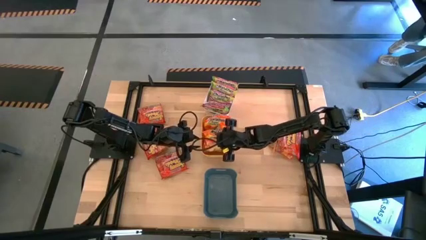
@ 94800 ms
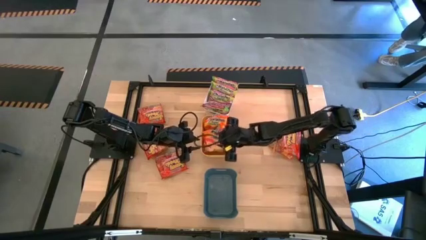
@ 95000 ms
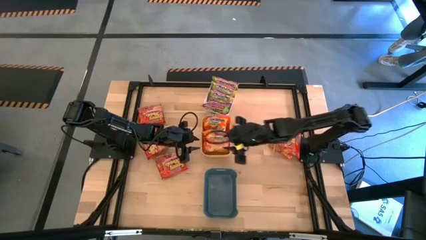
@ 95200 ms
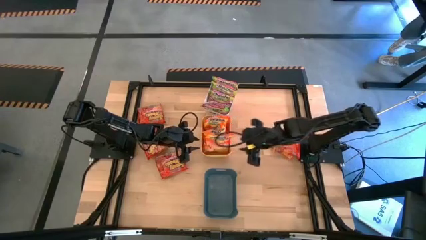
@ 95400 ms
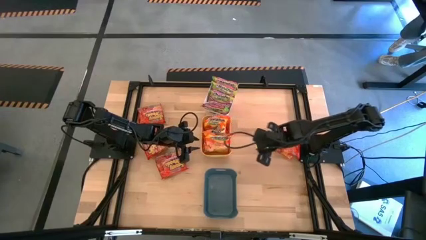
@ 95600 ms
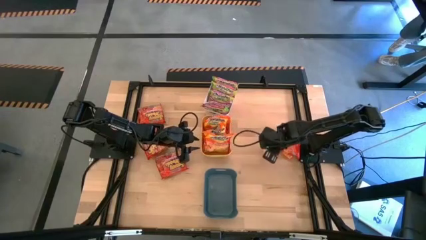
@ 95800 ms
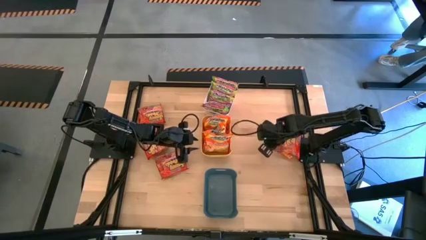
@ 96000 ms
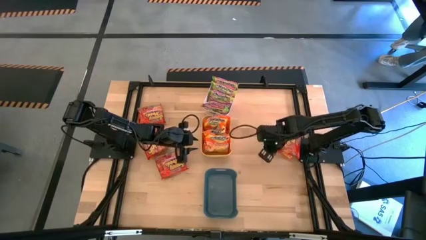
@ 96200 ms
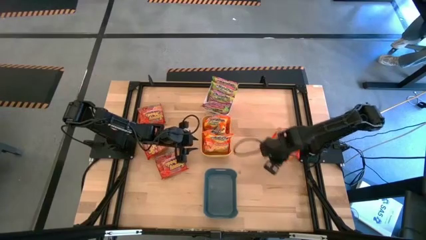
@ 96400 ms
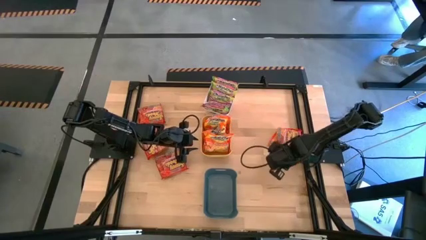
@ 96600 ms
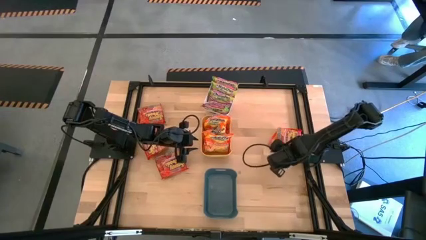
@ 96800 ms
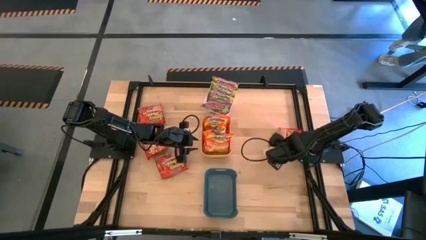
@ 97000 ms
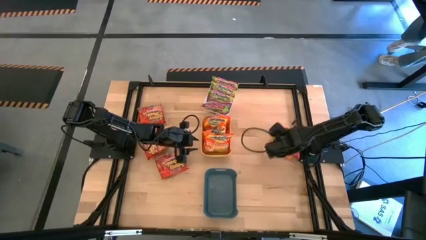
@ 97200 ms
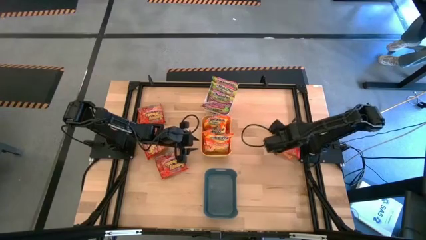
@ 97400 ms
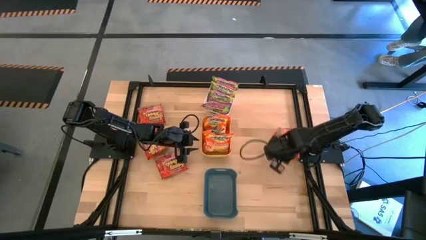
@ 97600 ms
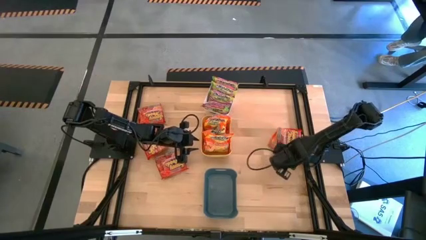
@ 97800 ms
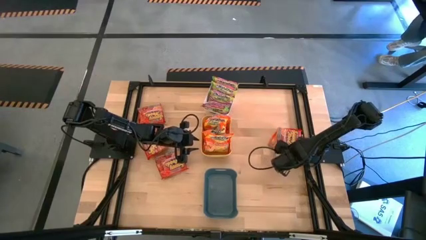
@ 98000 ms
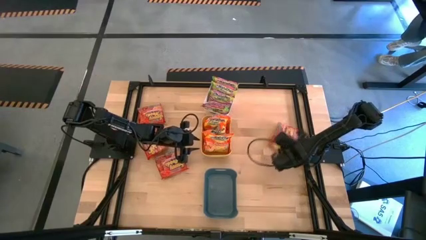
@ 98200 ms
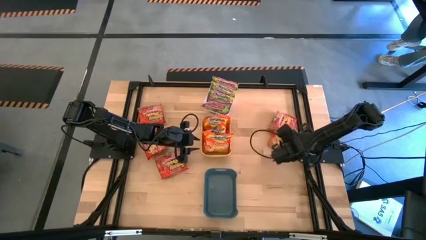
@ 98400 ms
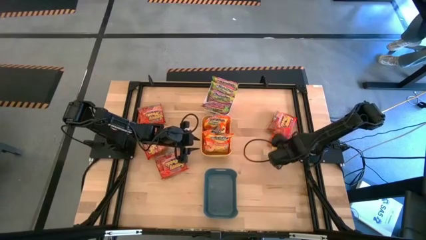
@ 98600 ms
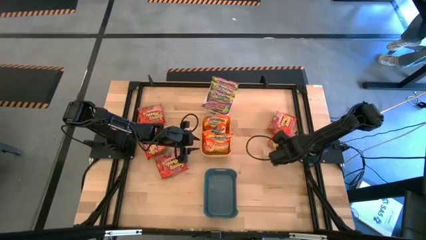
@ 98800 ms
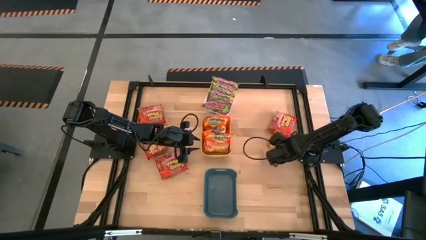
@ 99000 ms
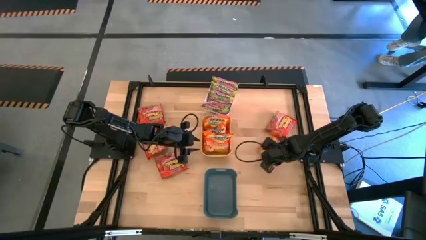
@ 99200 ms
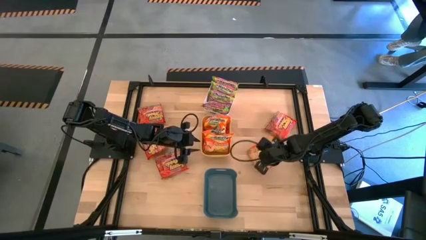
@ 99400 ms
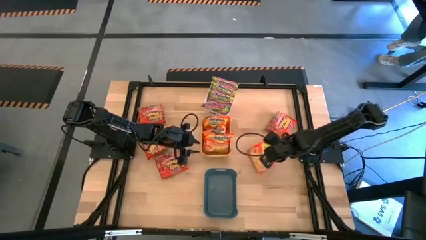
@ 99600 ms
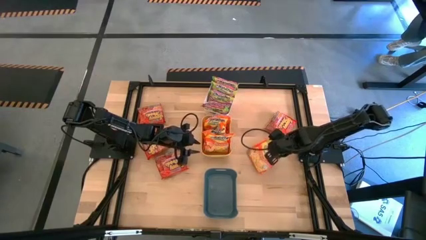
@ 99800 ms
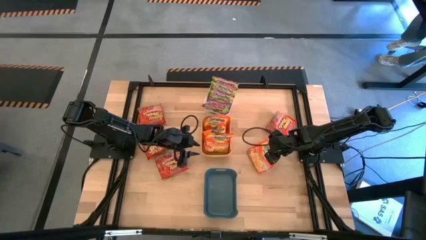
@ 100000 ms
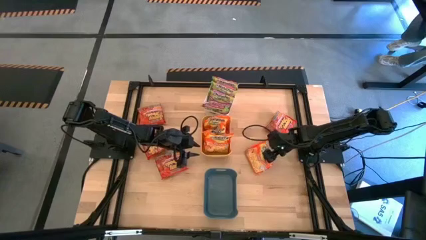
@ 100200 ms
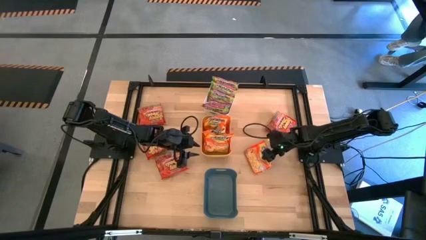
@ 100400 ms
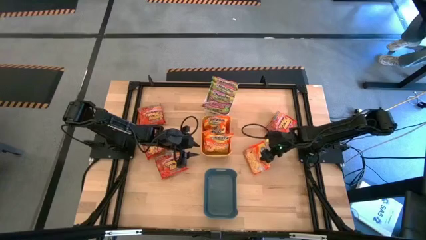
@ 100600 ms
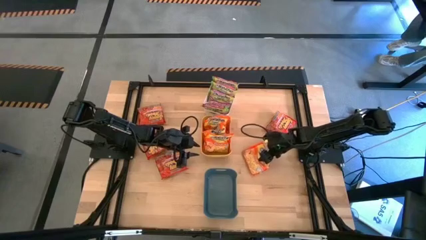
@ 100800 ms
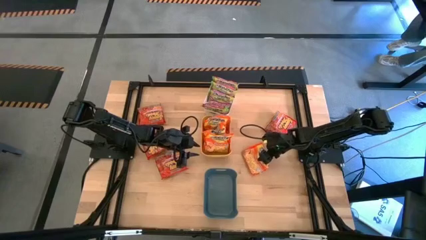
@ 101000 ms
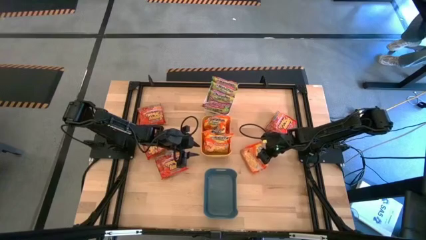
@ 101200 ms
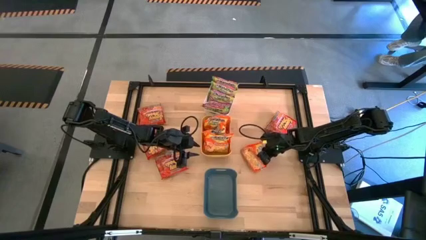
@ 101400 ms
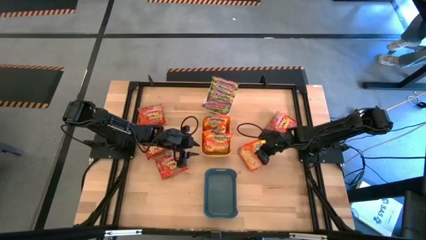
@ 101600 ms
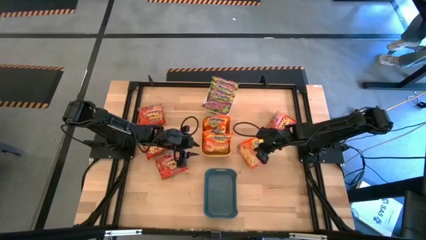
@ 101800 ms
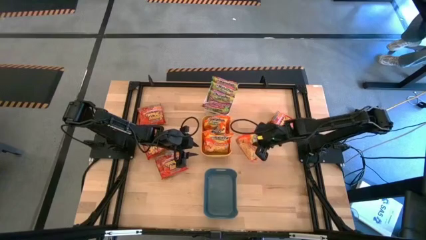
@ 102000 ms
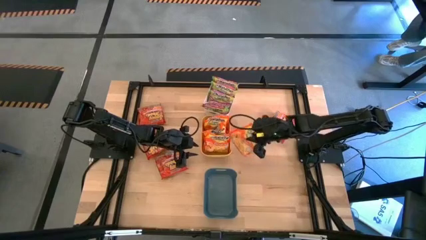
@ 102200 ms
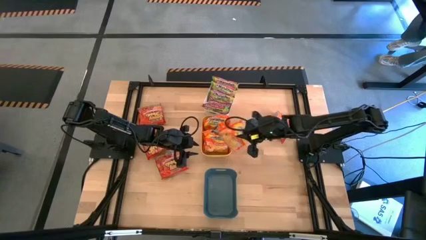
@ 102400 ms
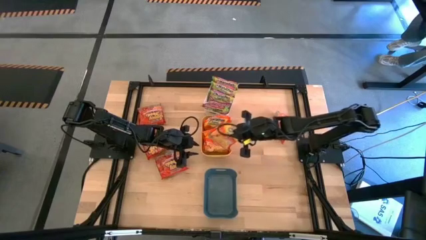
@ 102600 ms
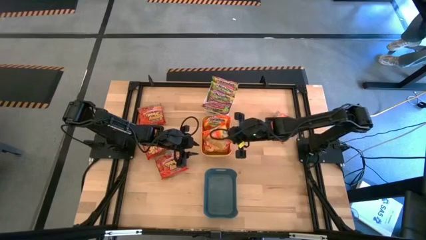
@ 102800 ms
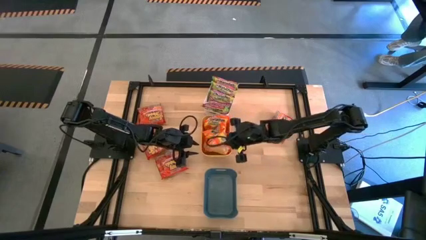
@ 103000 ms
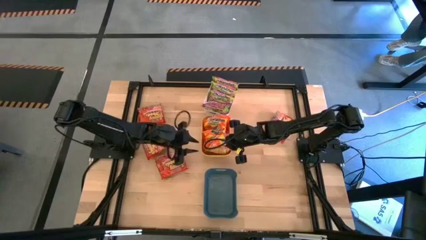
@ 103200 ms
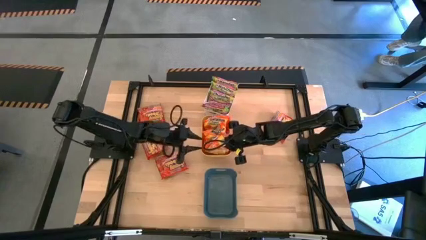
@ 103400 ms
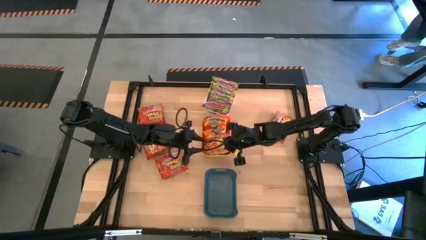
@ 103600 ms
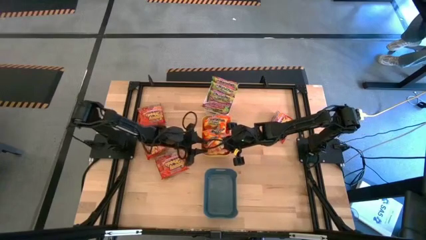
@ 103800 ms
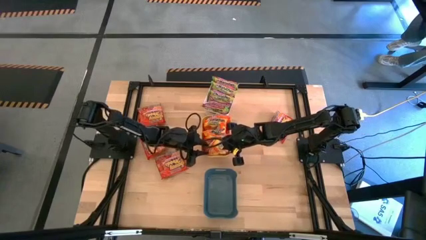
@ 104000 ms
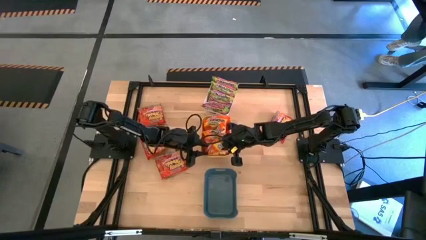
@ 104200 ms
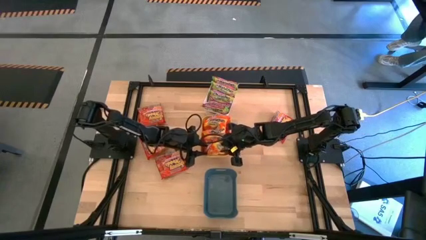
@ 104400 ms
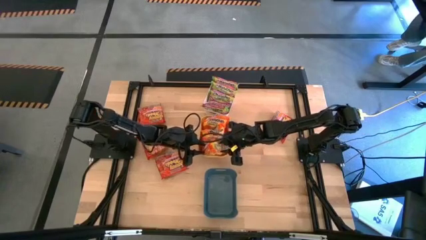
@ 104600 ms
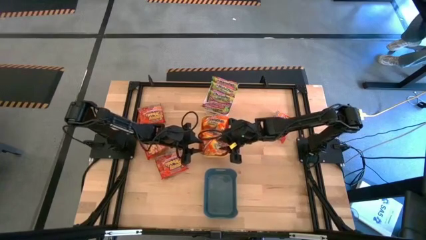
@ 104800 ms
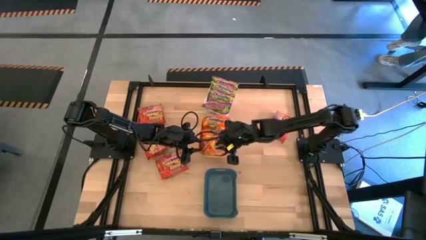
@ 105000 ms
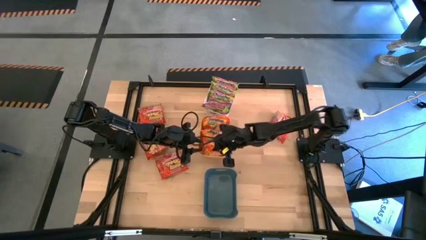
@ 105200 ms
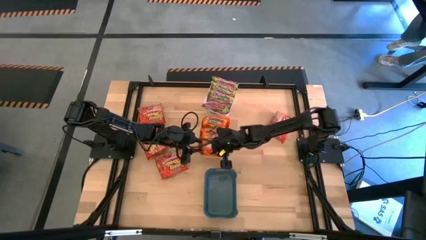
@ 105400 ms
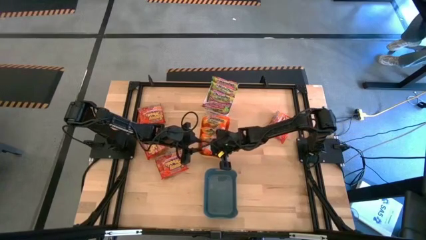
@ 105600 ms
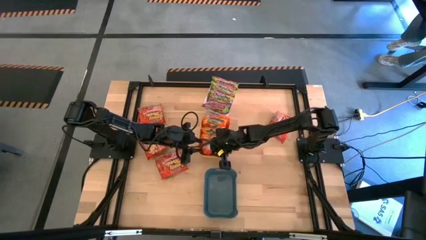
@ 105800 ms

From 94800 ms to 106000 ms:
Task: Sort Maruchan noodles
Put the yellow noodle pack into the yellow bin

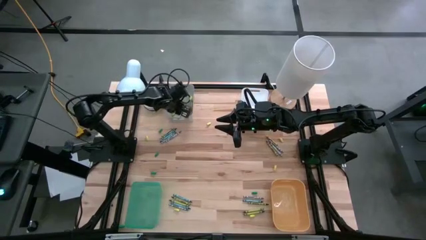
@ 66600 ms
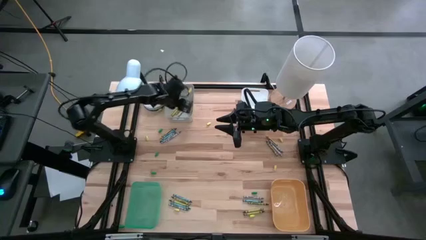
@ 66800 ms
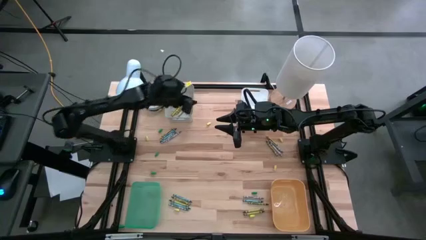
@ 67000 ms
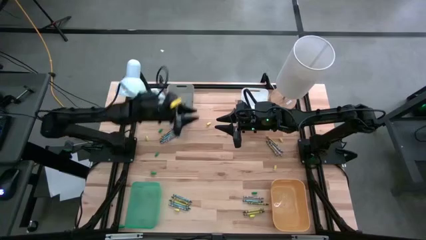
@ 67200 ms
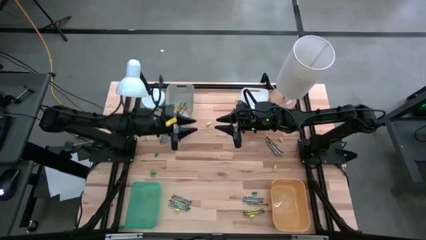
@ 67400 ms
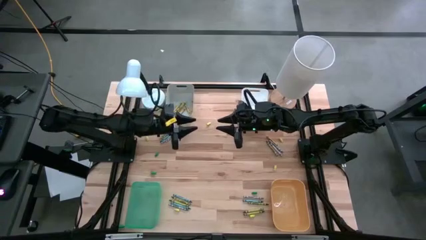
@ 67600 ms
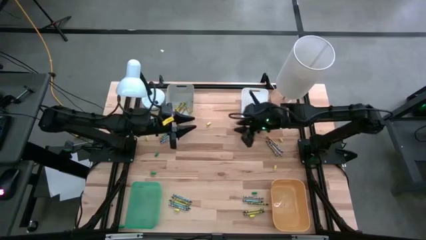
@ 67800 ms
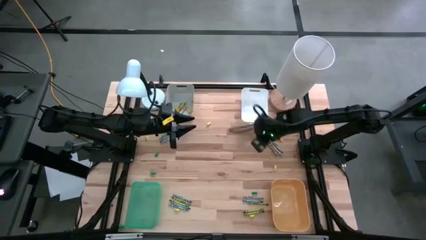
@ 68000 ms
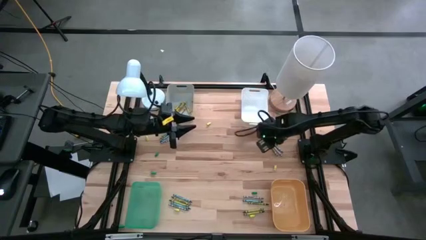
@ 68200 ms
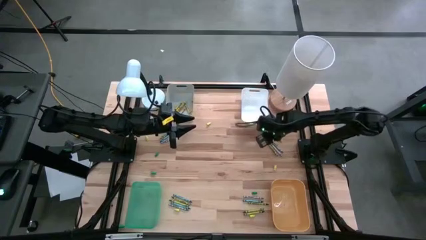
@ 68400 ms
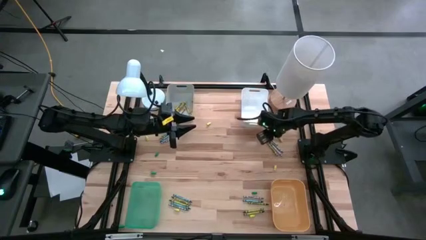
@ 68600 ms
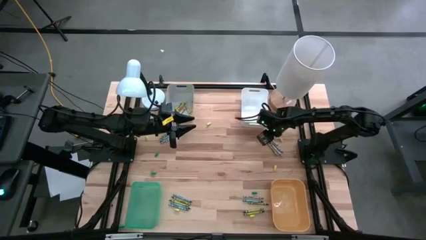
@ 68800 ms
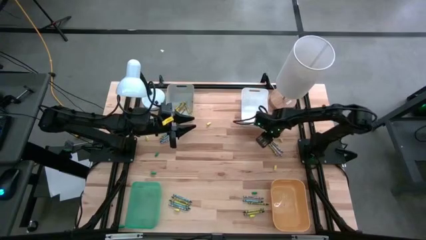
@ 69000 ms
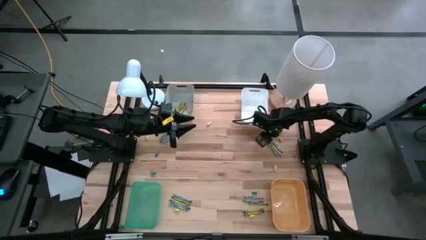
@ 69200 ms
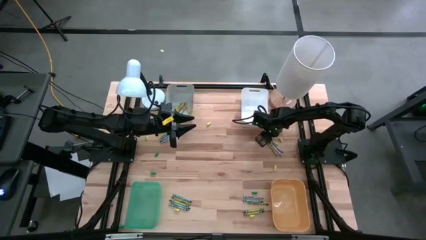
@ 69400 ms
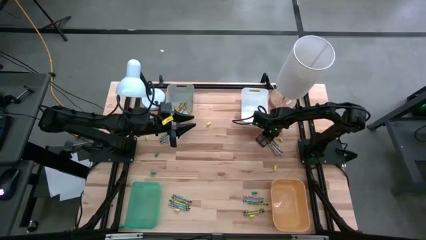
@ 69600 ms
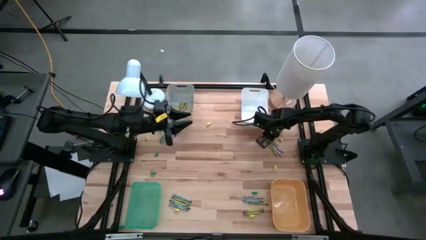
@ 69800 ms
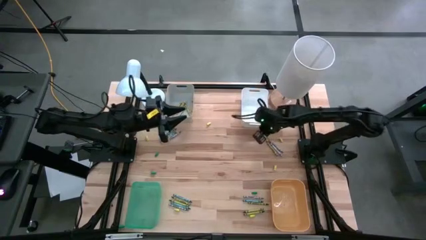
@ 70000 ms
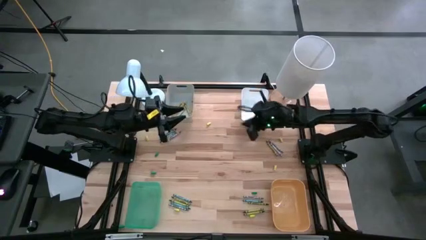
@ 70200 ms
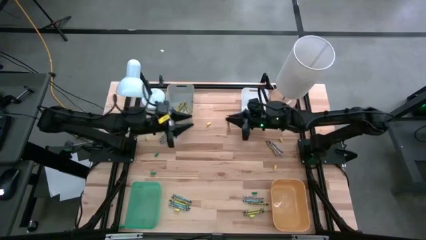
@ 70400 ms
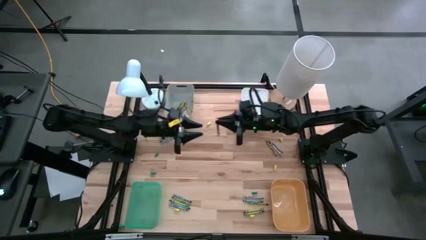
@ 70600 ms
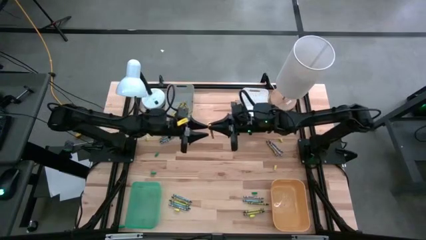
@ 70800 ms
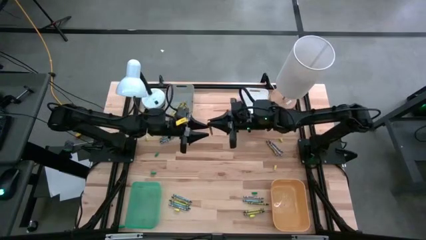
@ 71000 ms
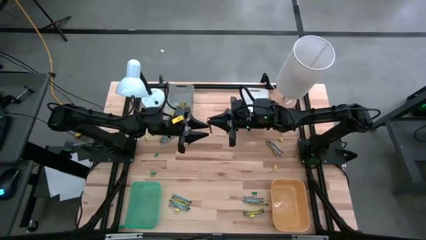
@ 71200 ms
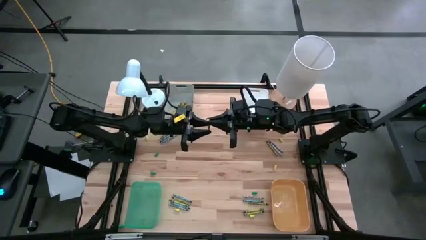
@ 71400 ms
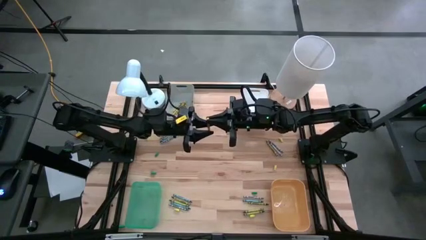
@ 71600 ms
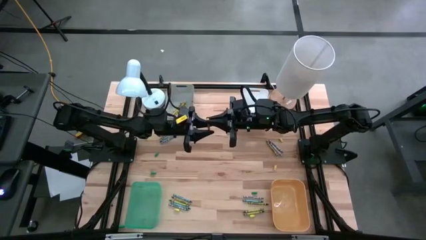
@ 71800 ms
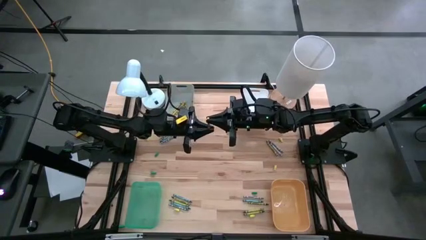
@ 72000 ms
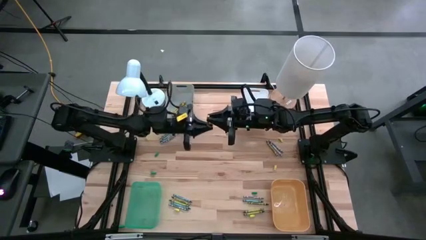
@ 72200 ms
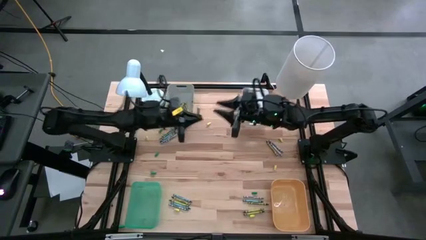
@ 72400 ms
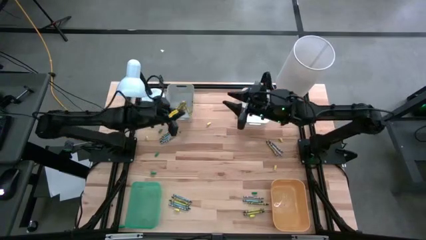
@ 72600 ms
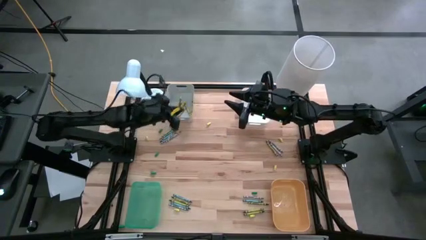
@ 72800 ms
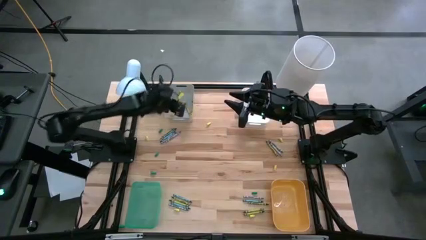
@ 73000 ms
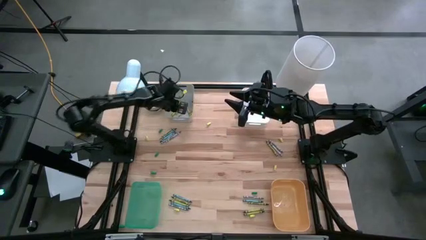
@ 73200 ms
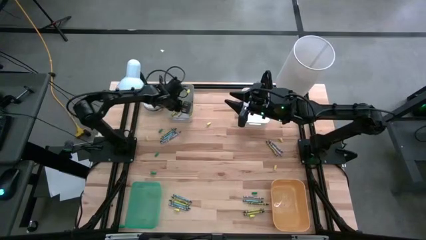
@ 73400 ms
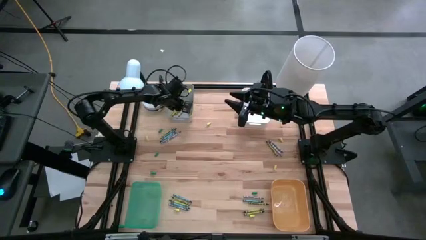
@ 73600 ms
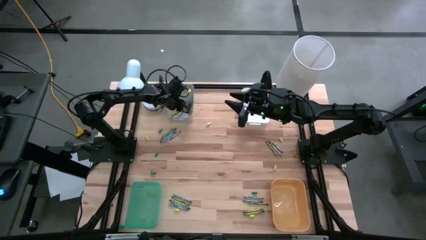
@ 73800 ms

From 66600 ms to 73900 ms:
Task: Sort crayons
Put the yellow crayon into the gray bin
